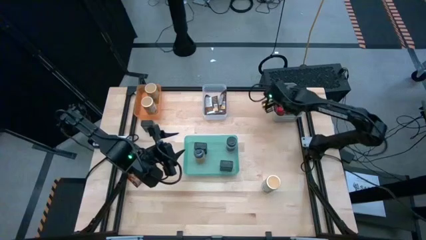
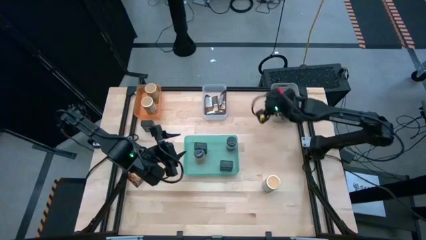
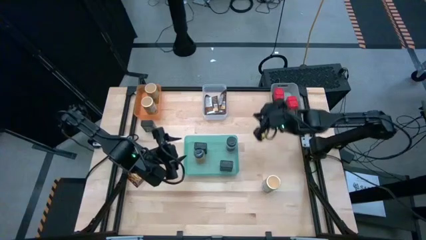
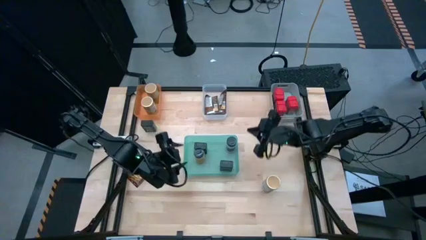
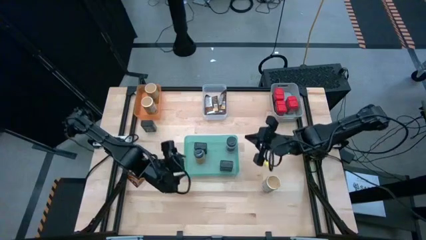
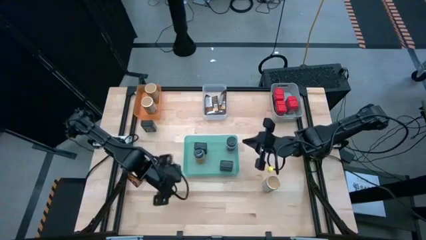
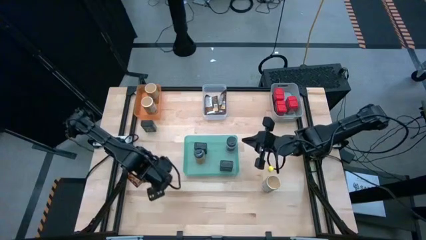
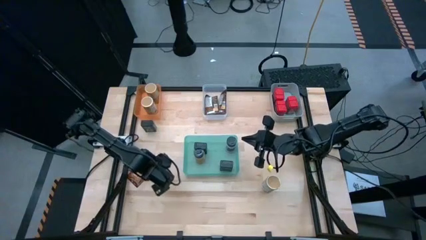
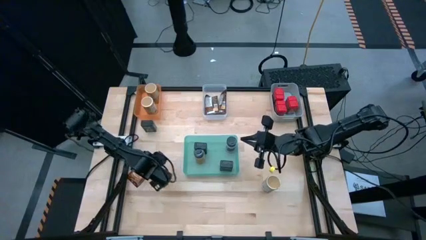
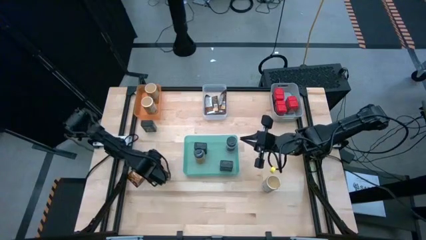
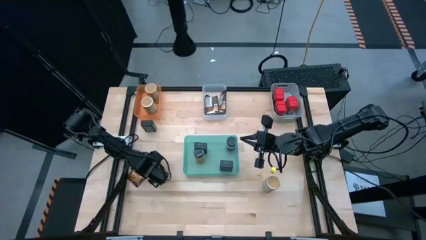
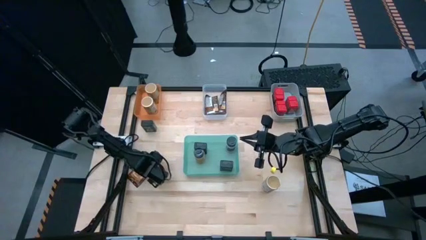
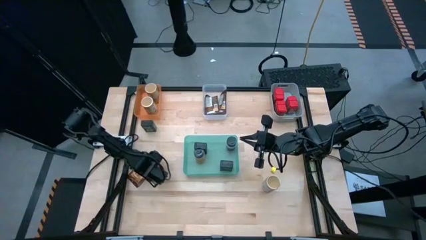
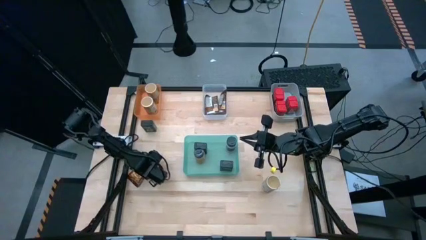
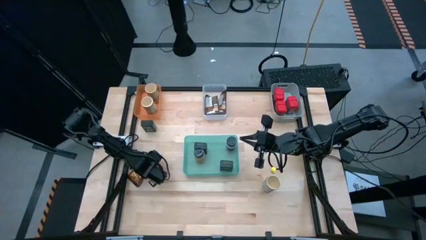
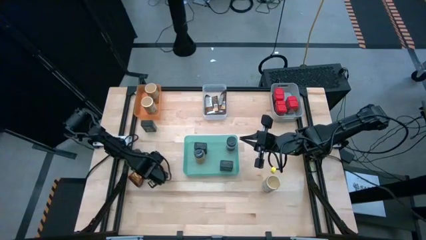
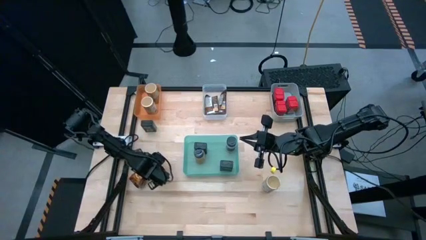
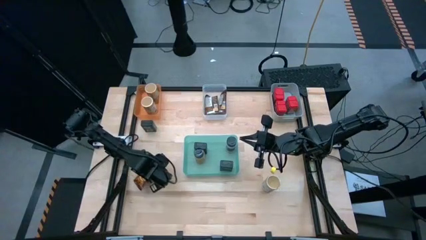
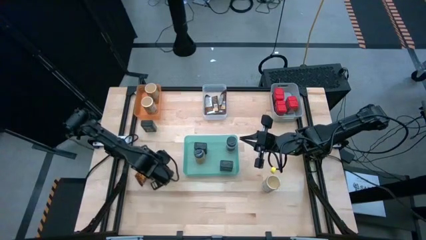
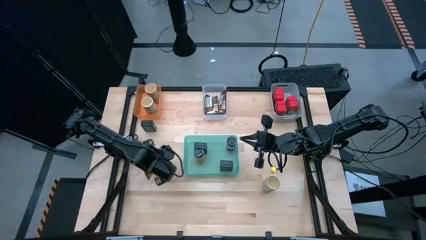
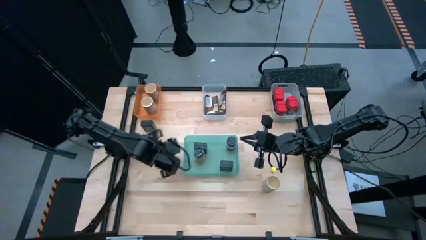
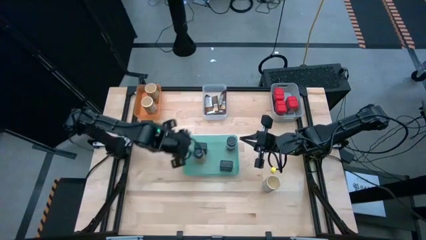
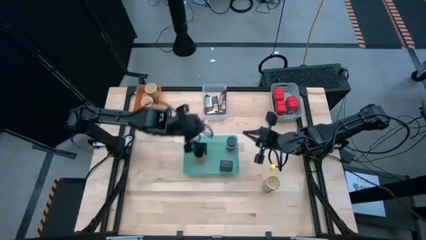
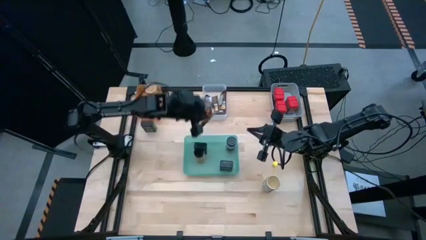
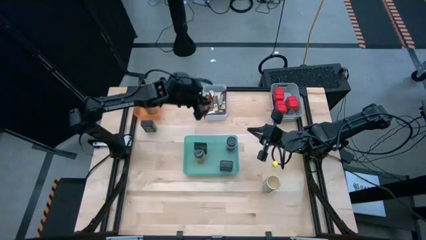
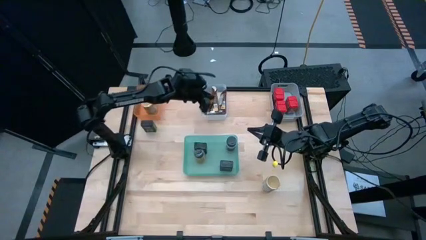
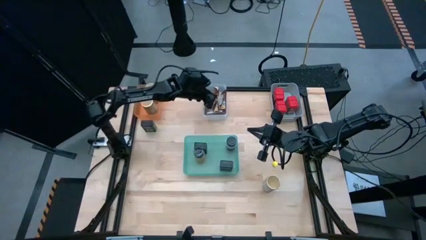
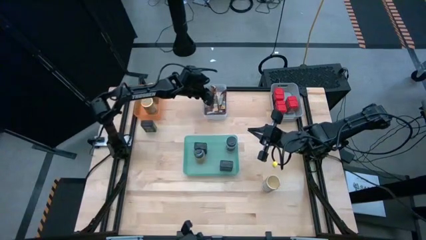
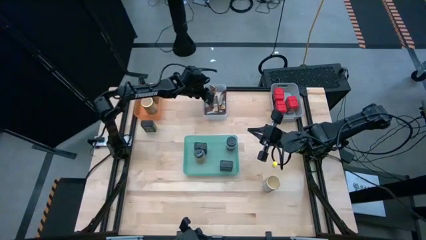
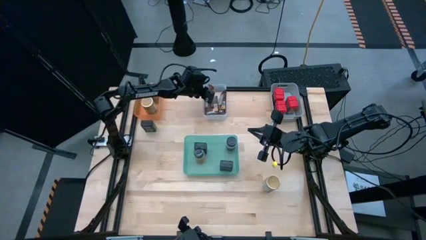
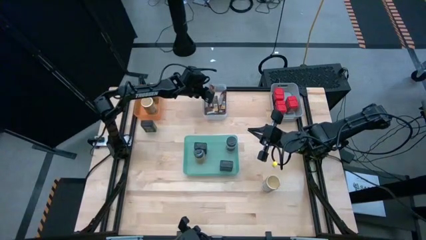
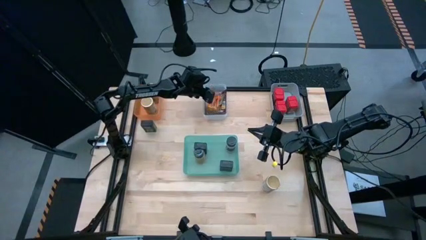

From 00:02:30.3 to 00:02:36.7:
Task: Sort spices by type
Put the orange spice pack into the transparent bin

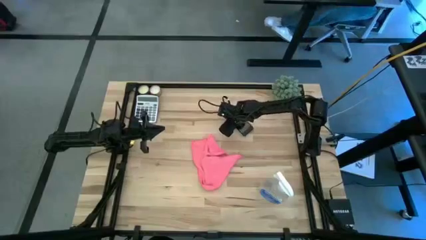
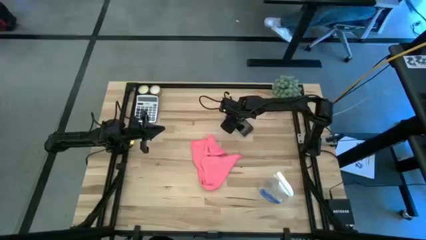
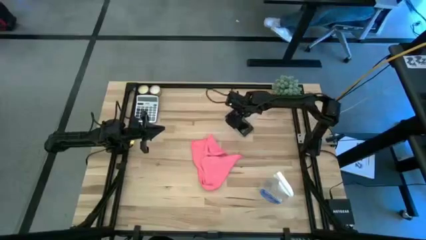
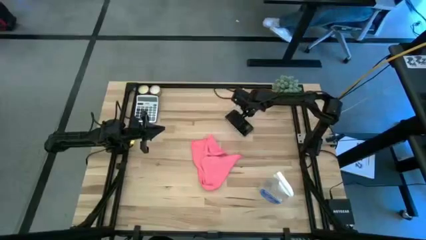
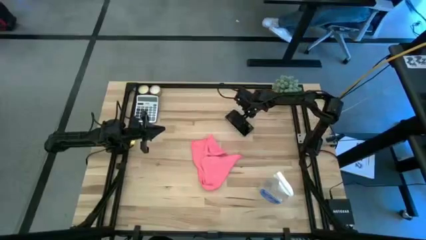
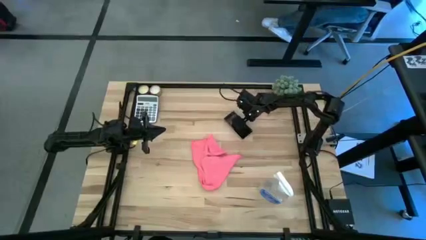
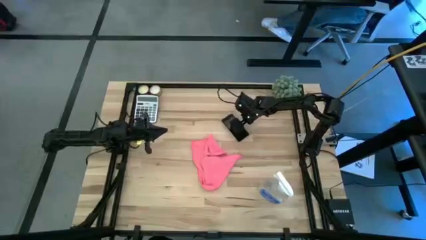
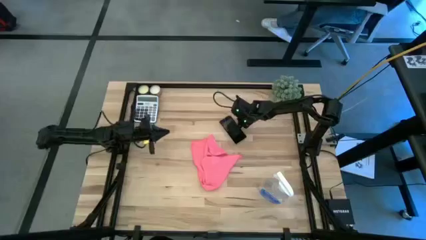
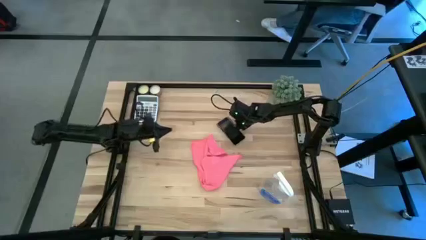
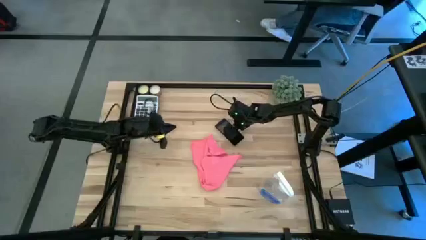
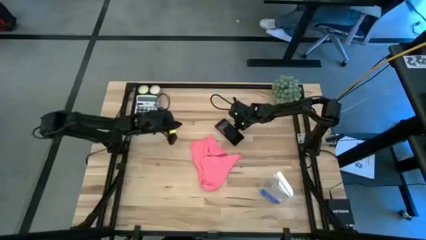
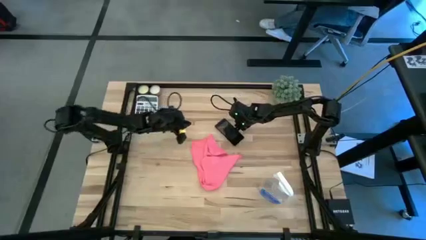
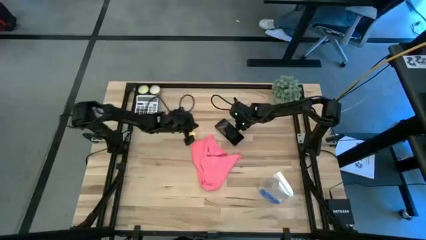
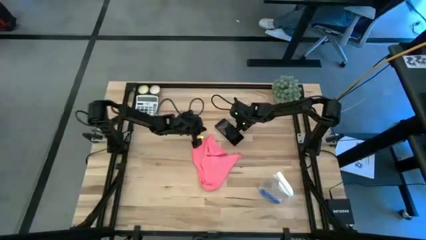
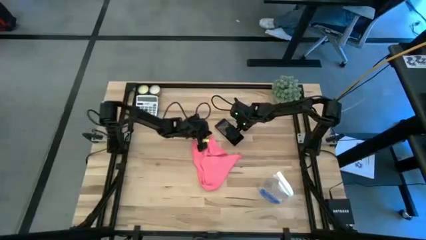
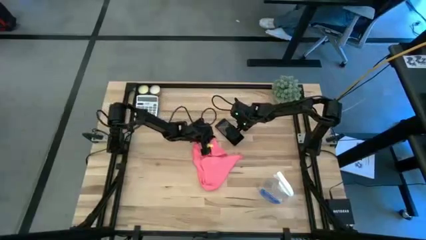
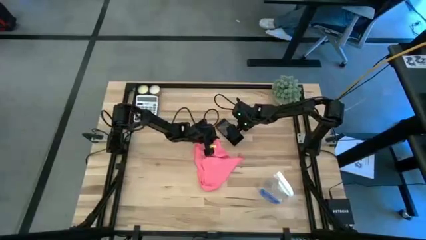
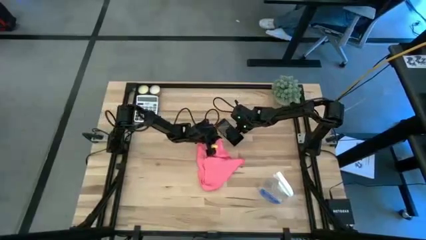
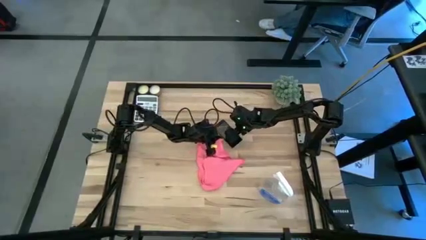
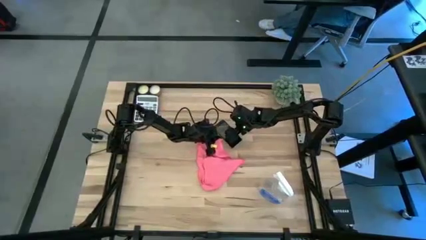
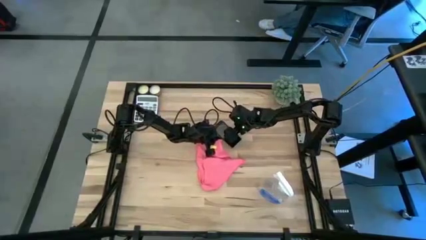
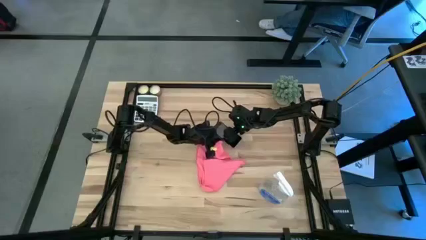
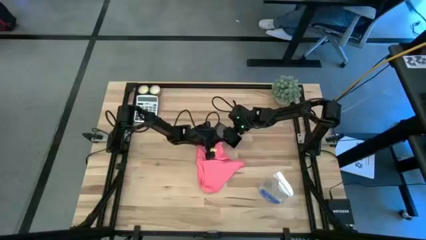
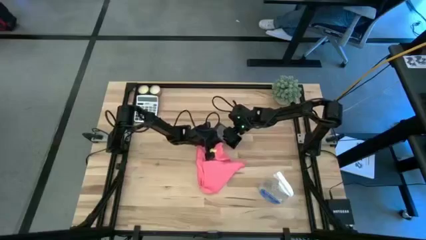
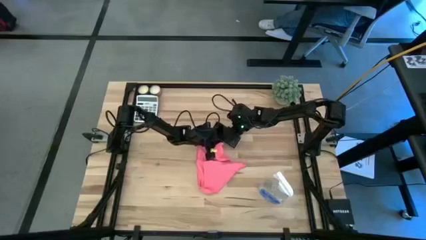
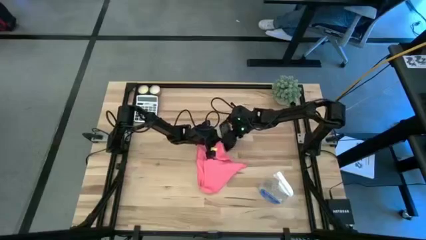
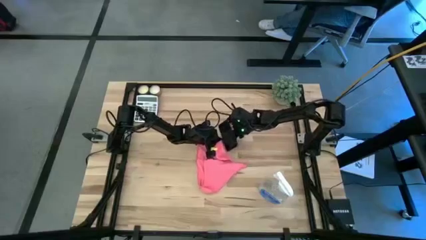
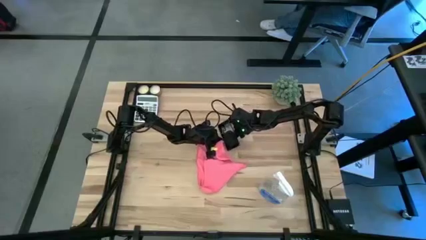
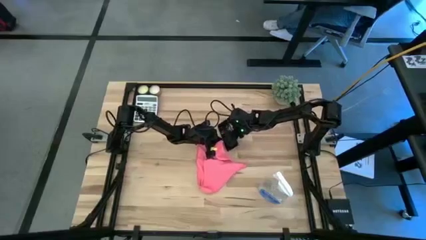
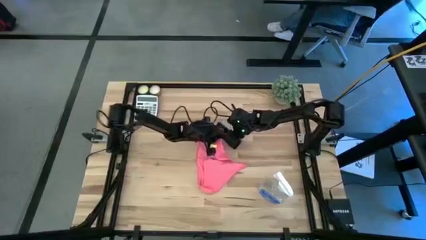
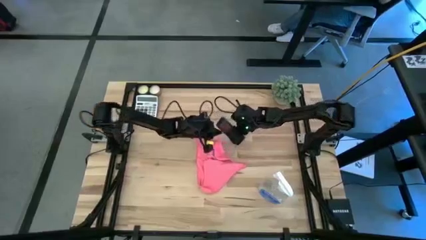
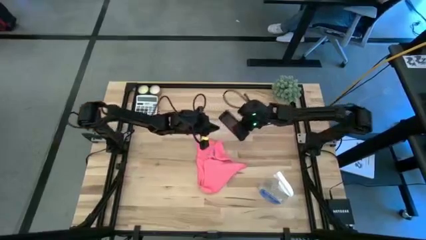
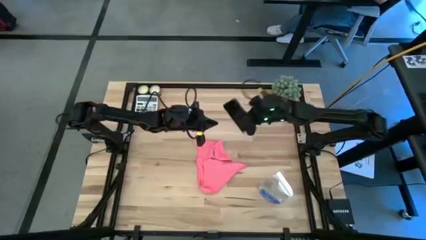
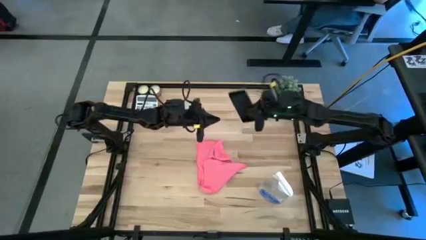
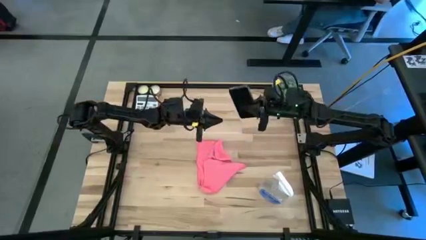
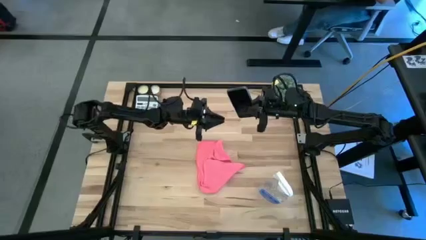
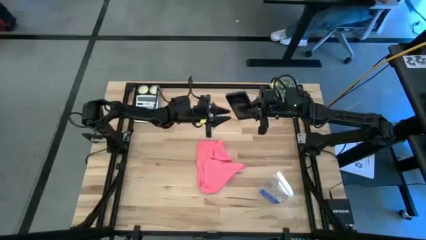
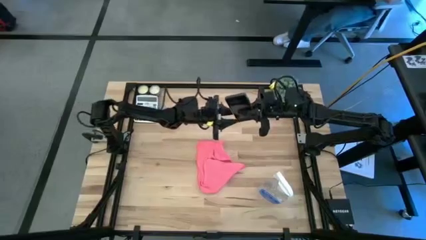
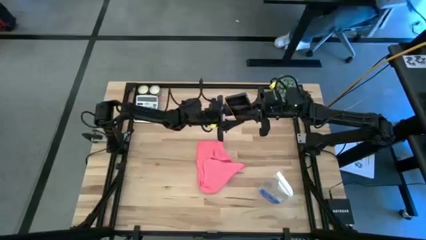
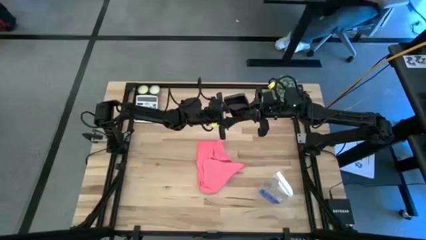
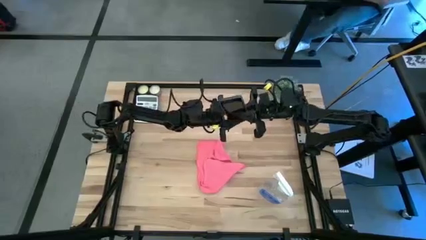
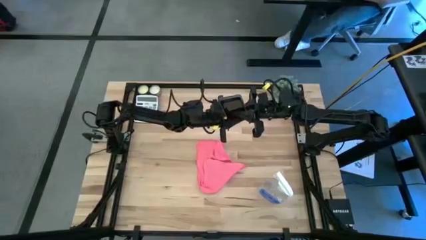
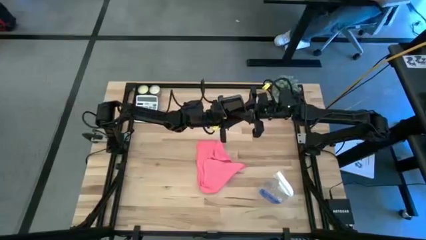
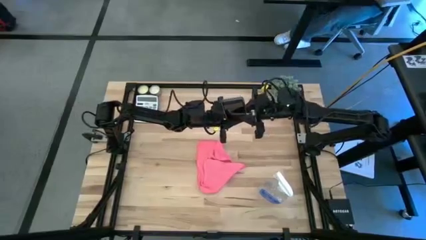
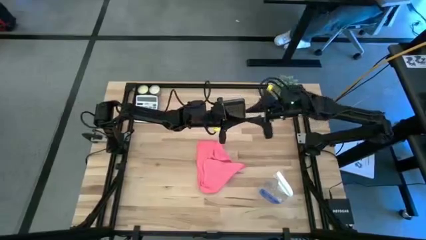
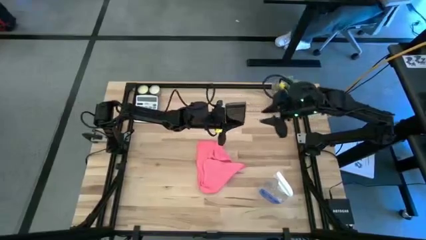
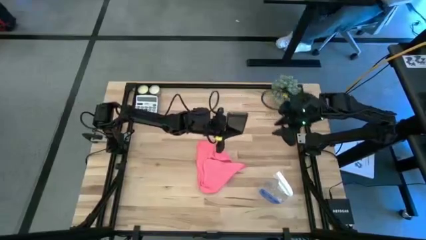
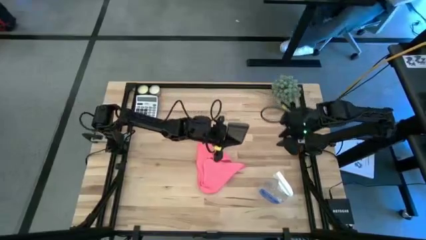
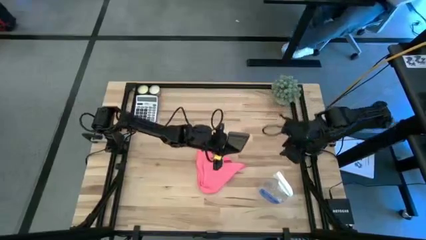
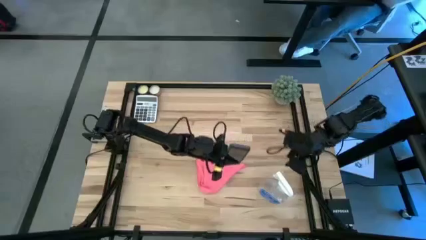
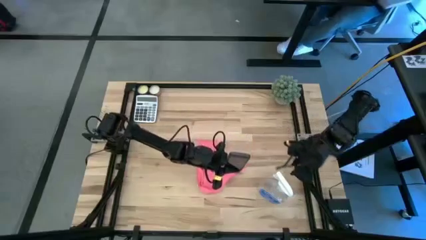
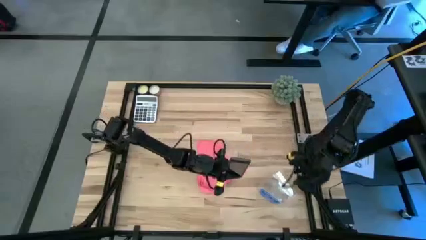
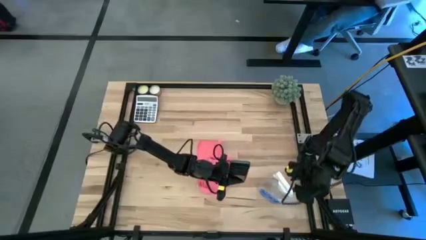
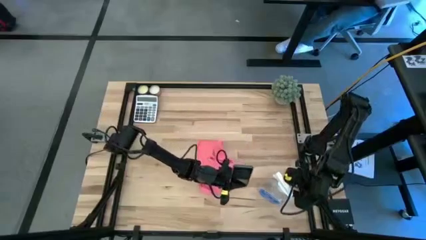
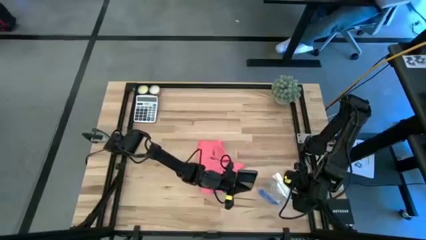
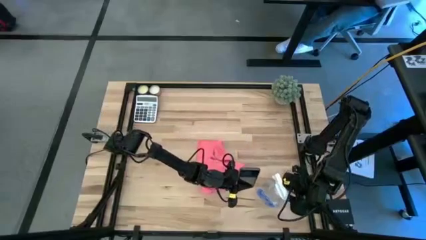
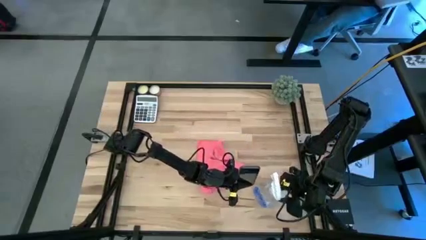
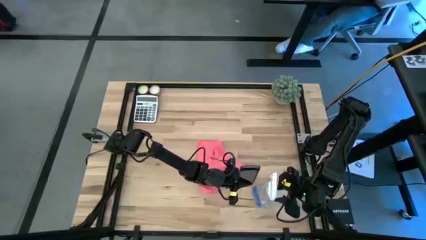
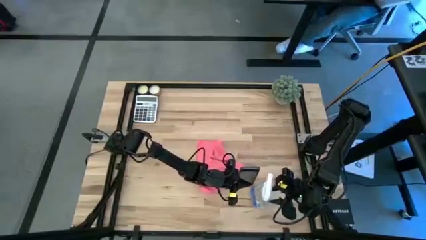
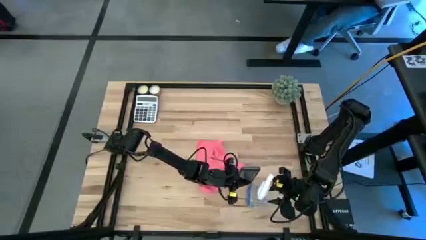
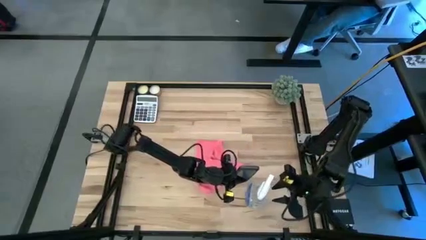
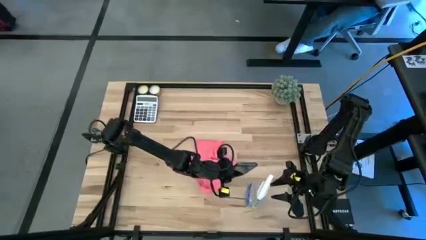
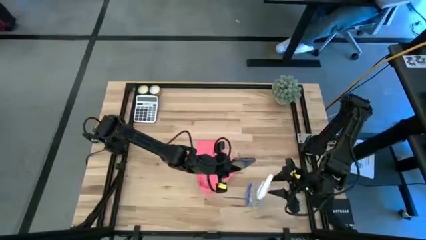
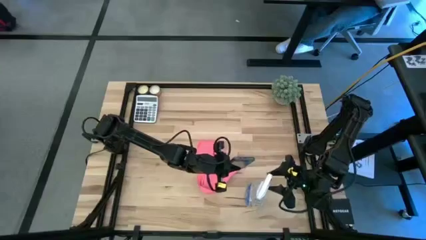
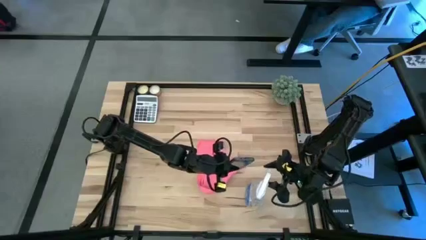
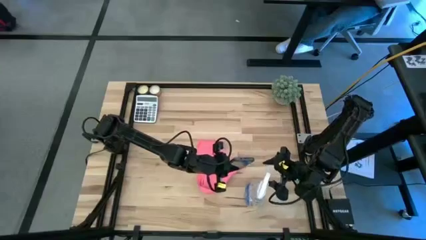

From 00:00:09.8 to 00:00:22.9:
Task: Apply microfiber cloth
Spray the black cellphone with the spray bottle
